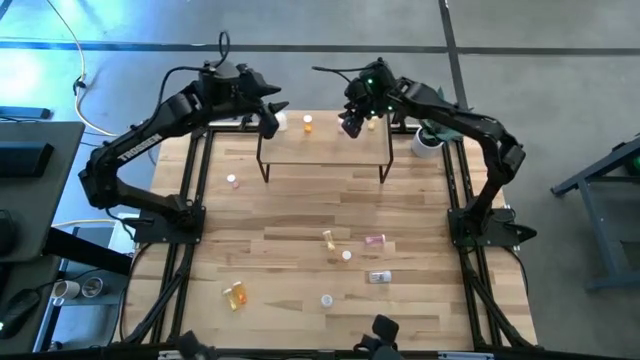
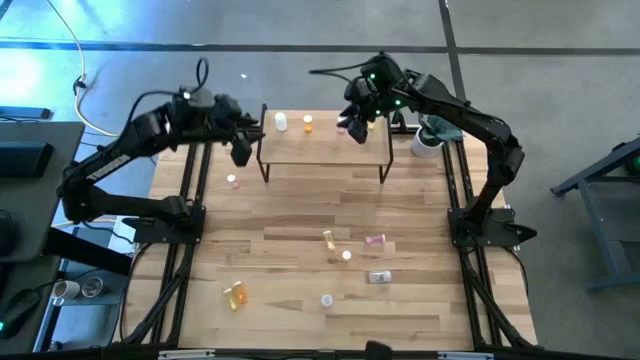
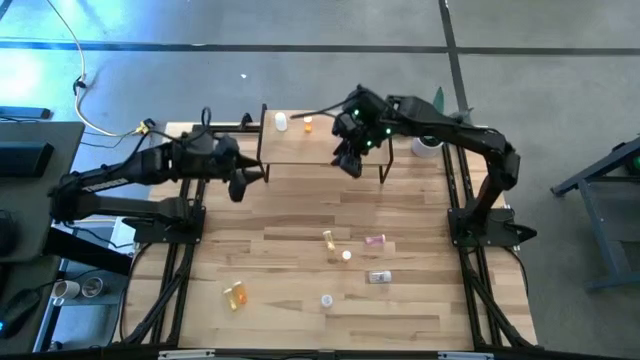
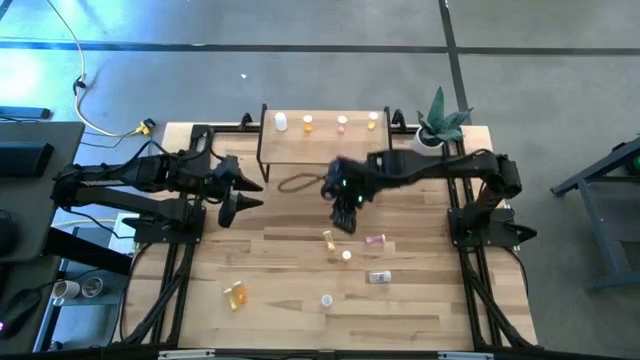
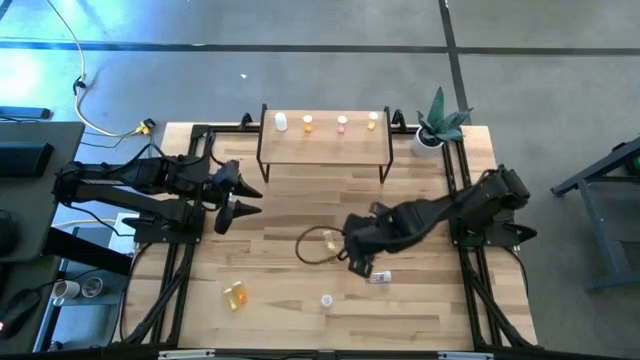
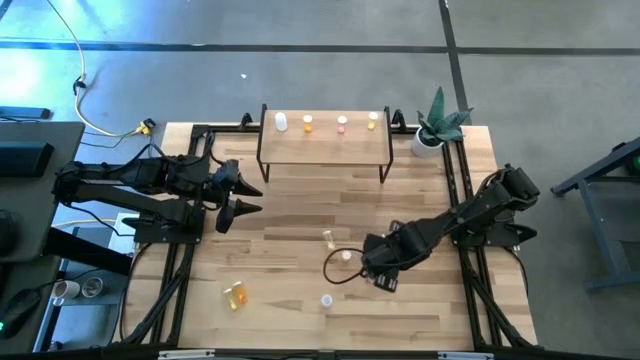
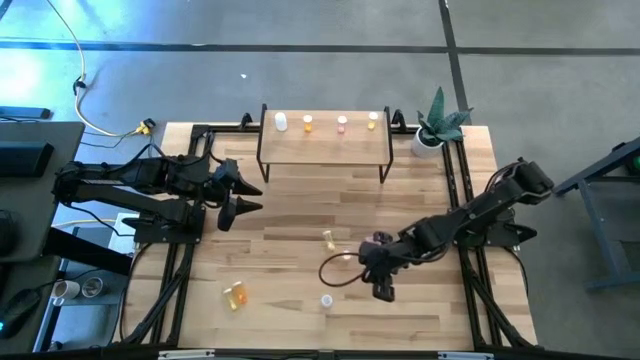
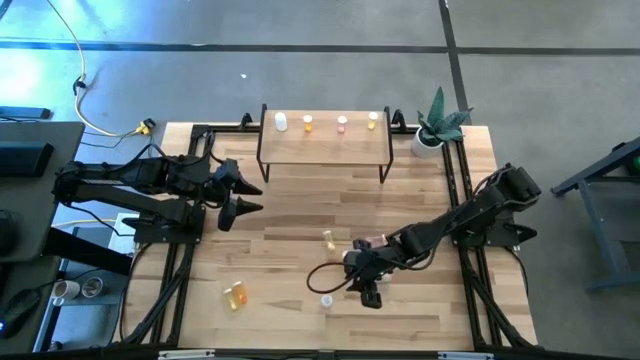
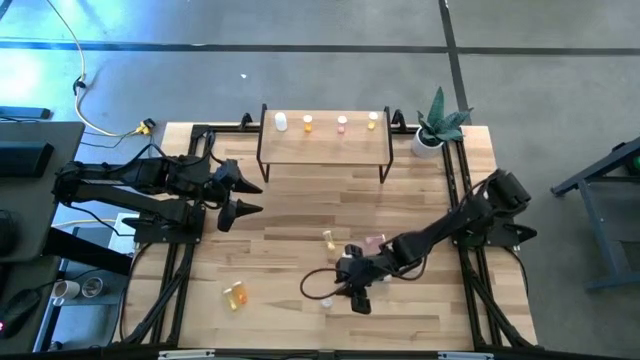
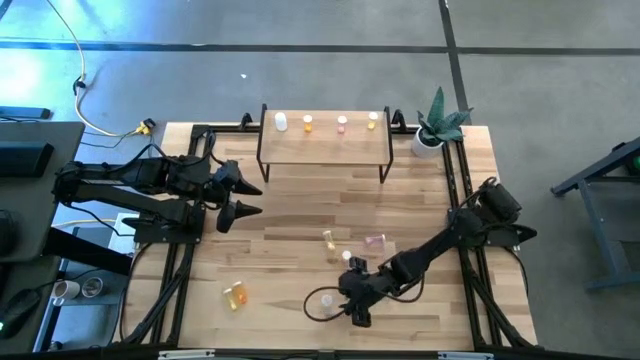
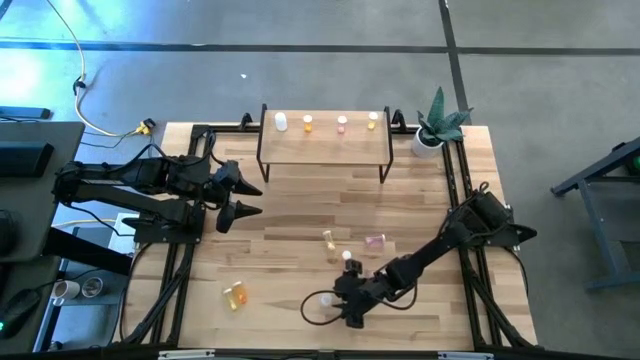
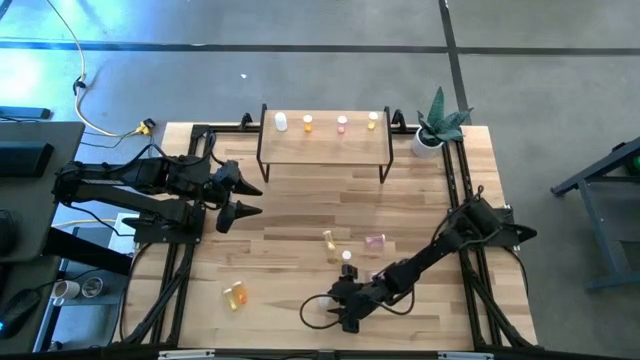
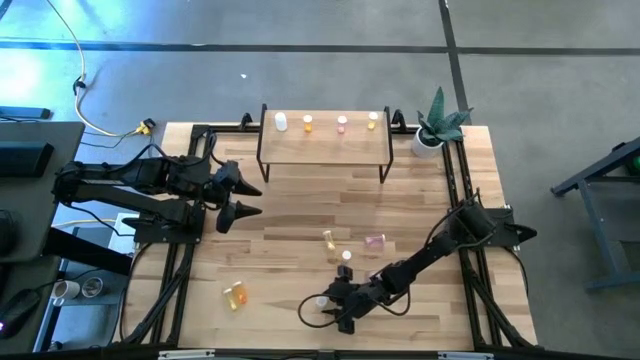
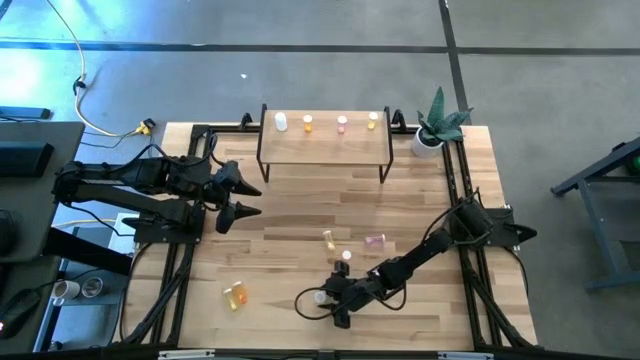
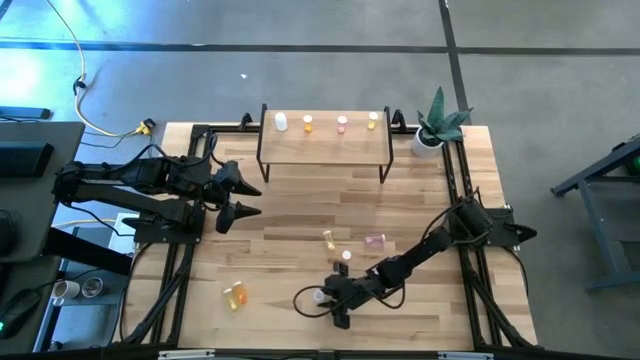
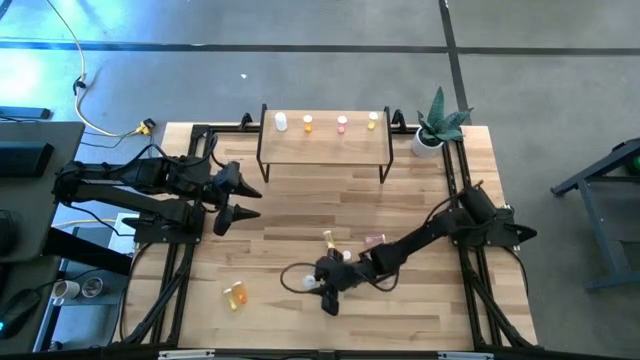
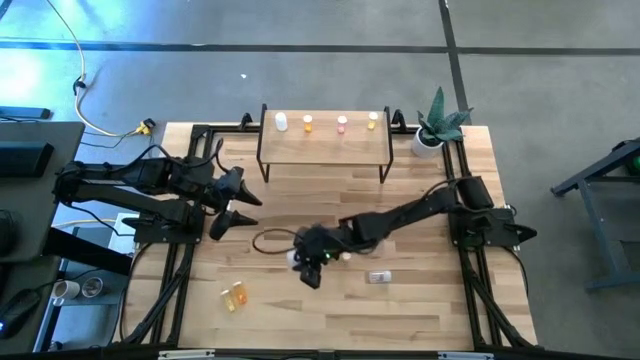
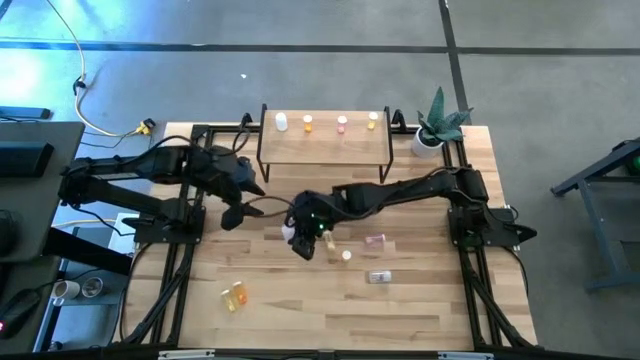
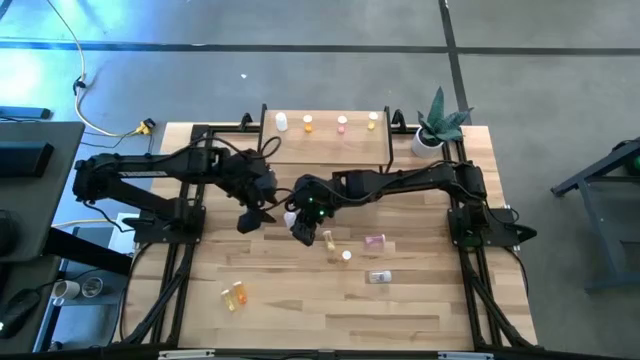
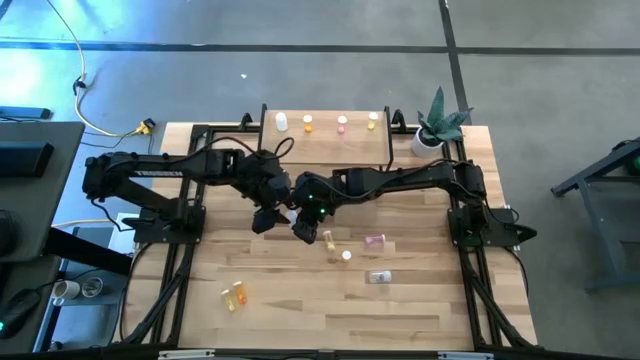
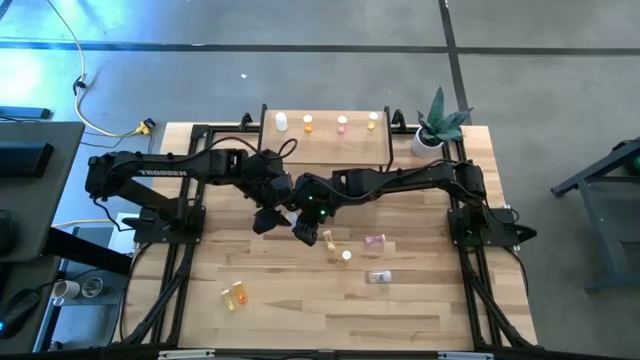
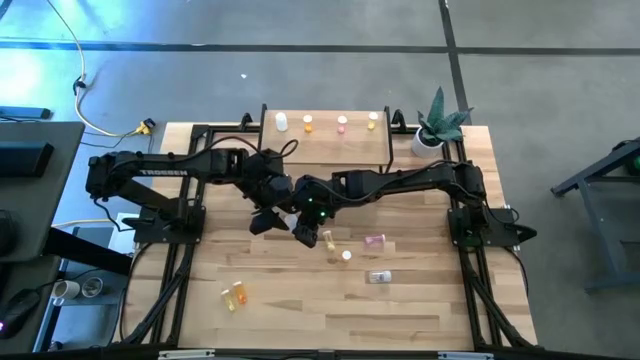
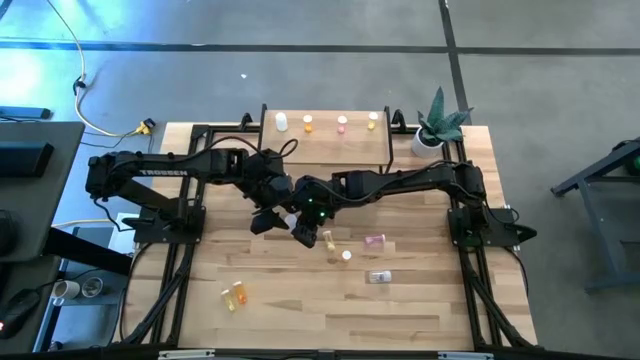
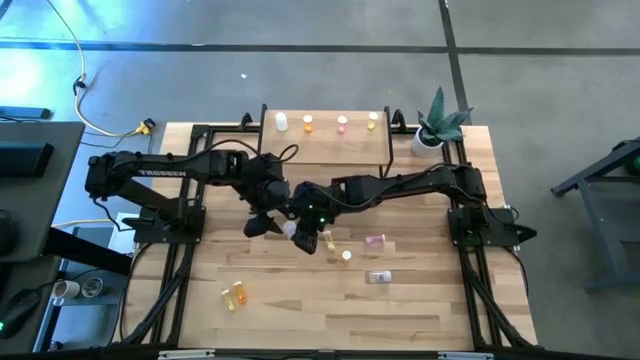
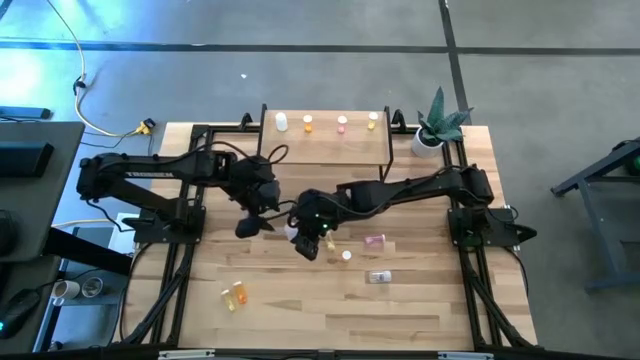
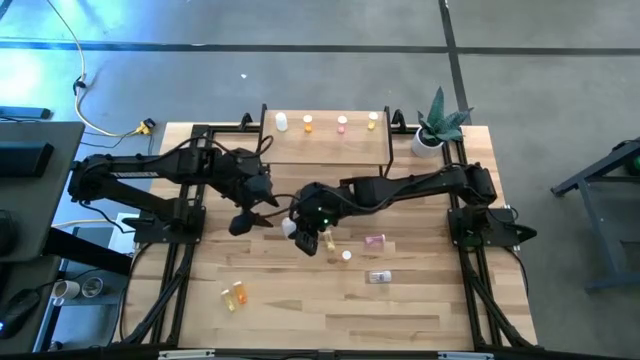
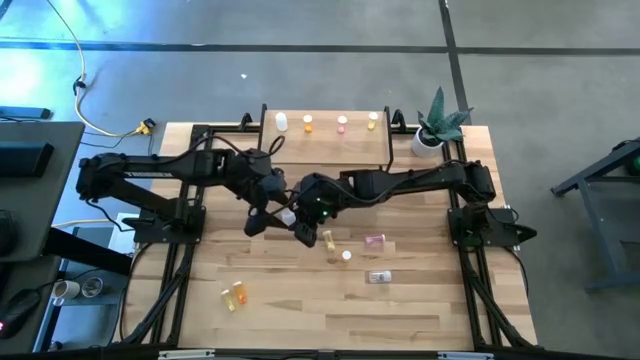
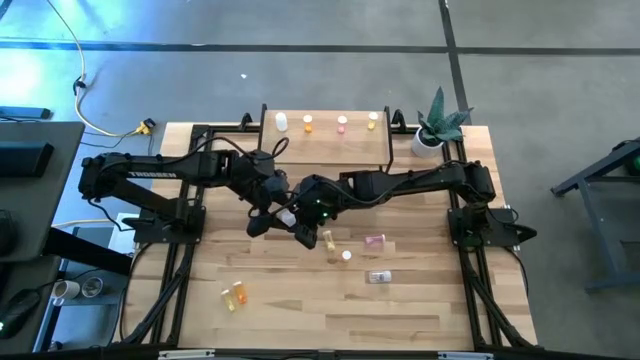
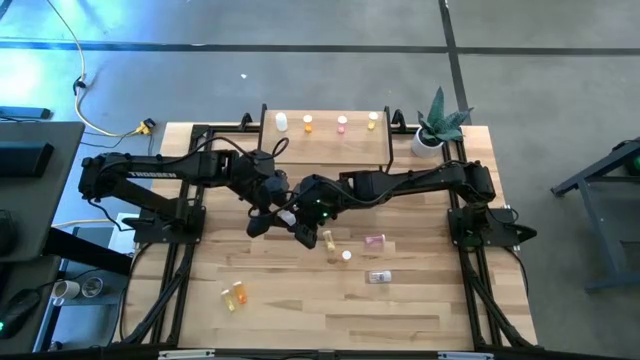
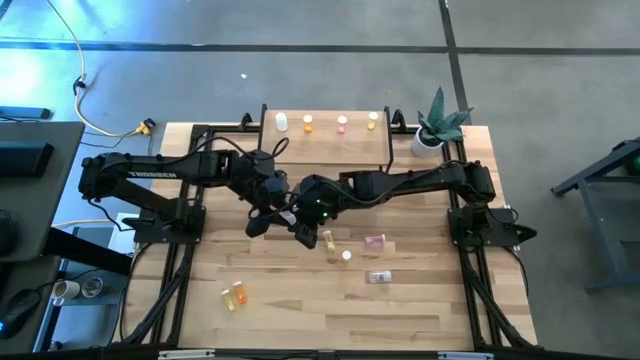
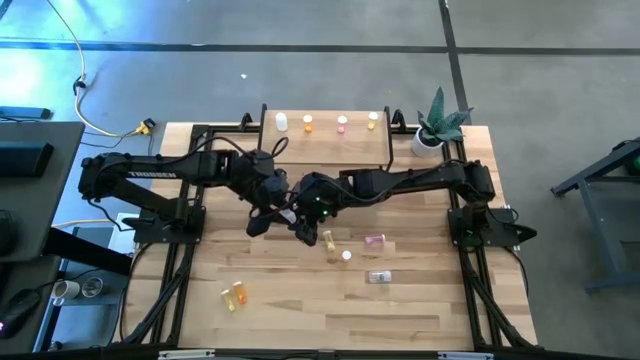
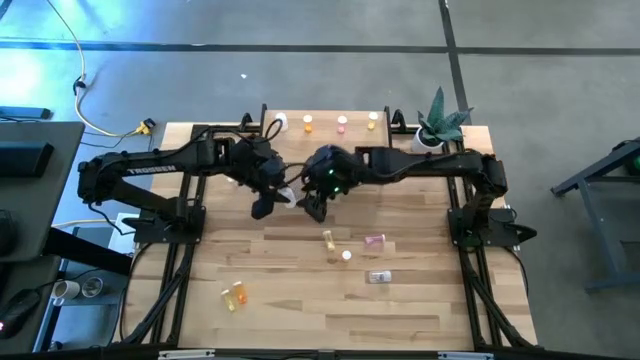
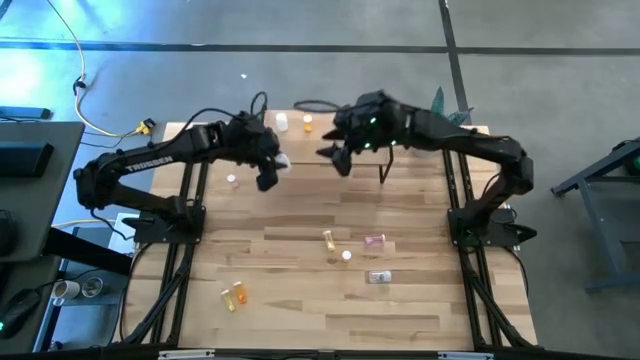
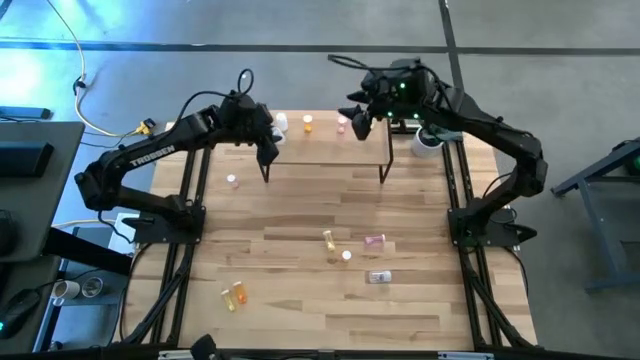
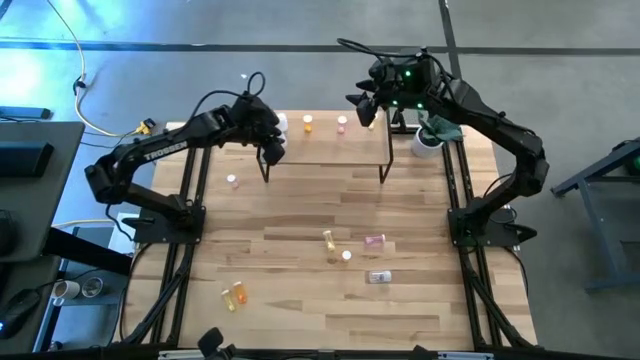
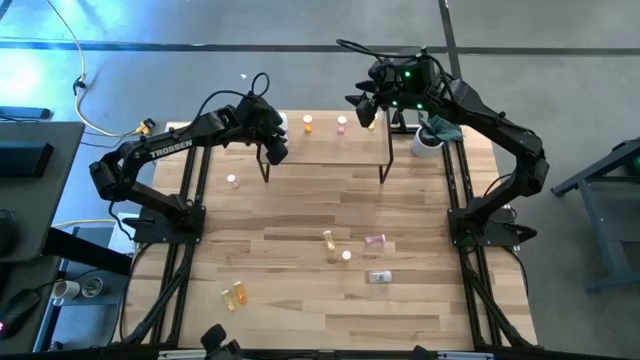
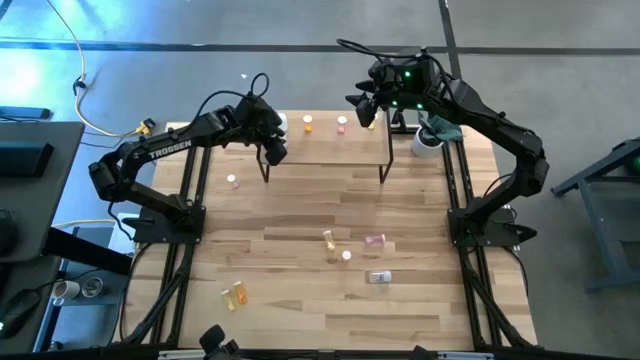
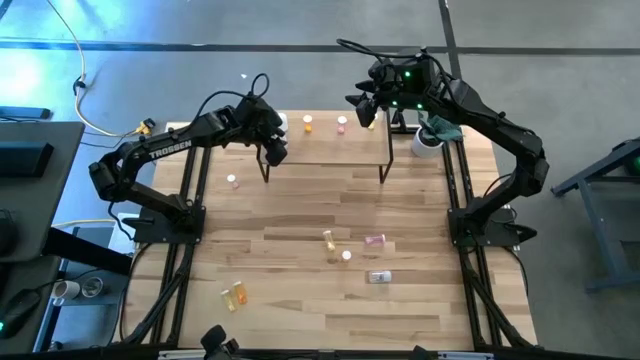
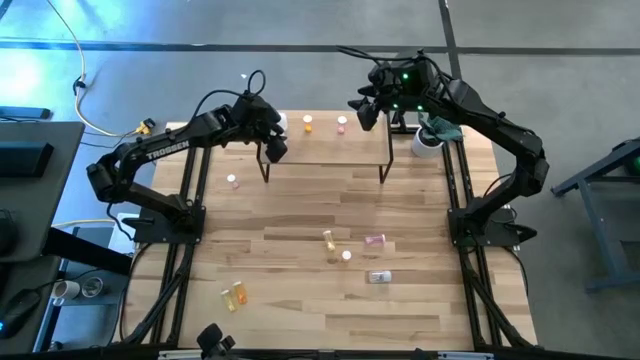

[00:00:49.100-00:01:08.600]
Task: Pick and place medicine bottles onto shelf by color
Put the bottom transparent pill bottle aligned with the other transparent pill bottle on the shelf
